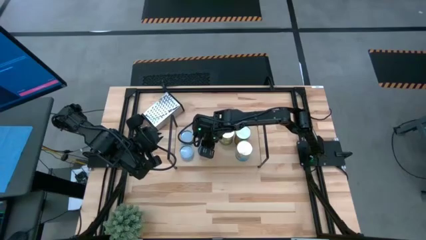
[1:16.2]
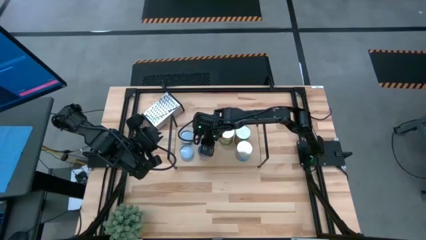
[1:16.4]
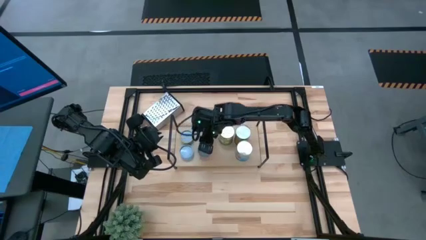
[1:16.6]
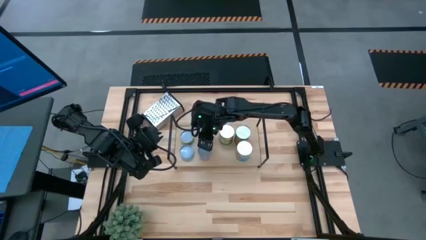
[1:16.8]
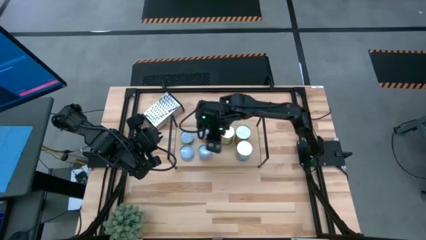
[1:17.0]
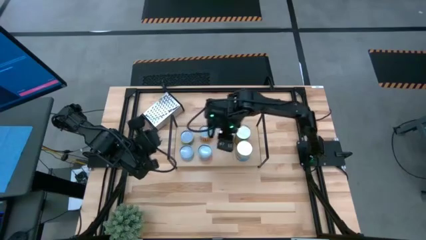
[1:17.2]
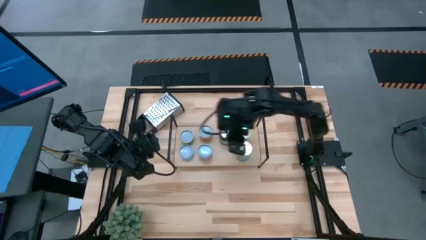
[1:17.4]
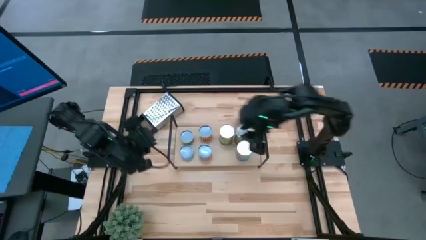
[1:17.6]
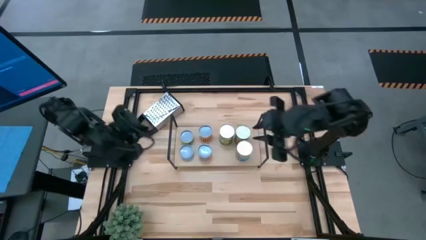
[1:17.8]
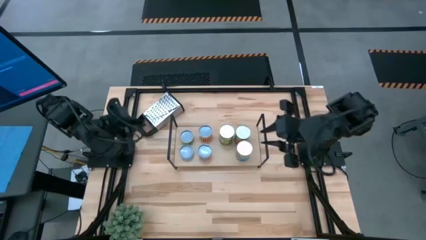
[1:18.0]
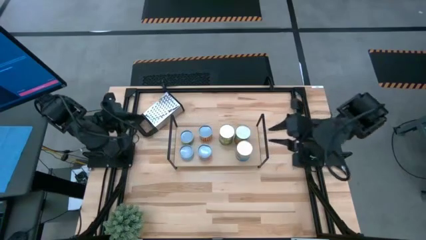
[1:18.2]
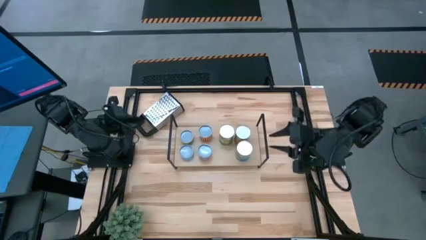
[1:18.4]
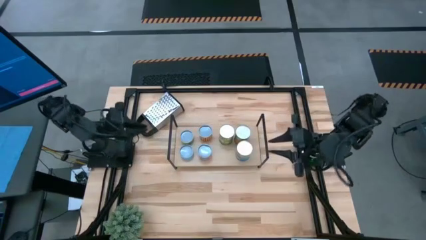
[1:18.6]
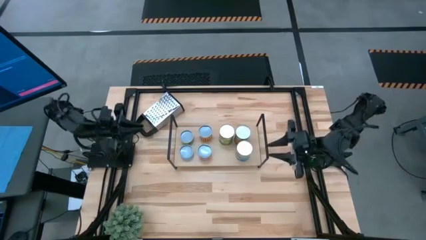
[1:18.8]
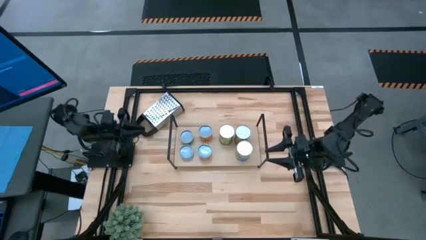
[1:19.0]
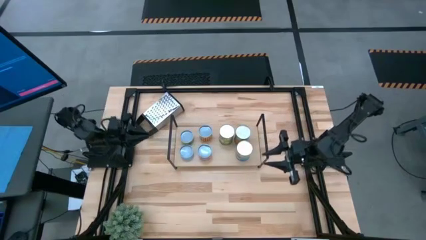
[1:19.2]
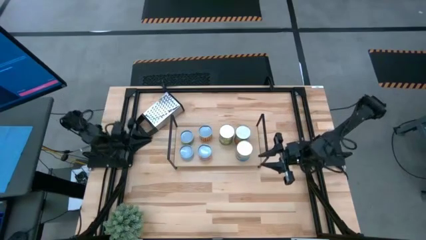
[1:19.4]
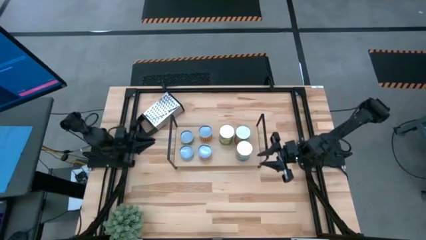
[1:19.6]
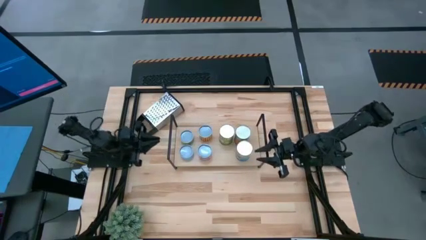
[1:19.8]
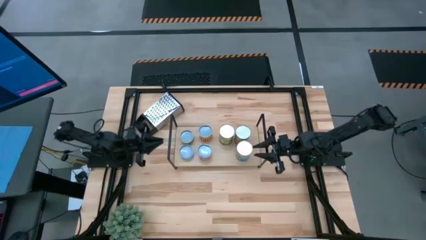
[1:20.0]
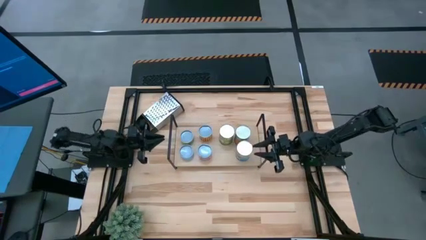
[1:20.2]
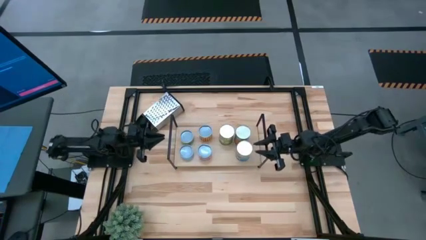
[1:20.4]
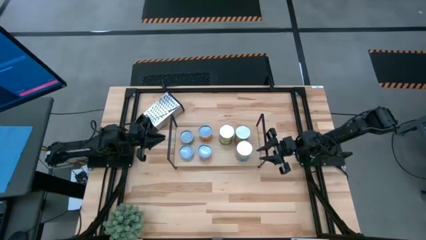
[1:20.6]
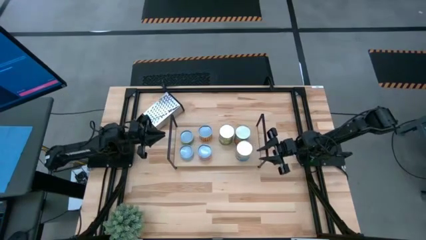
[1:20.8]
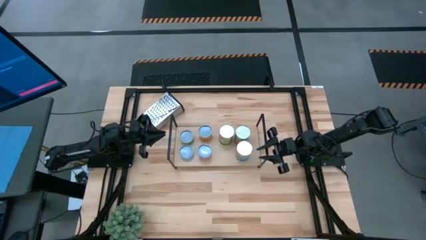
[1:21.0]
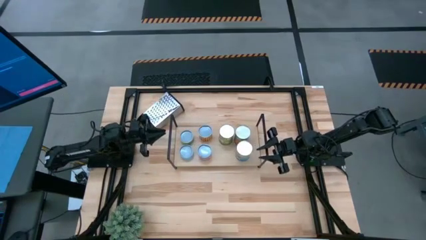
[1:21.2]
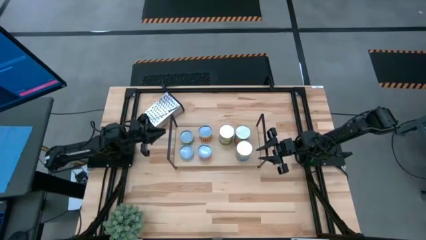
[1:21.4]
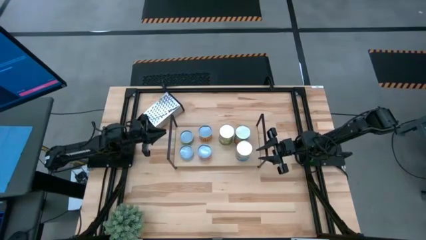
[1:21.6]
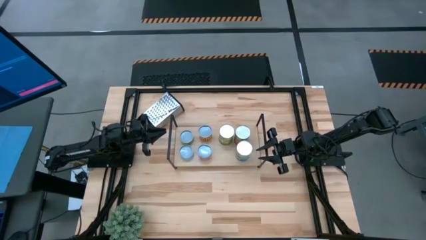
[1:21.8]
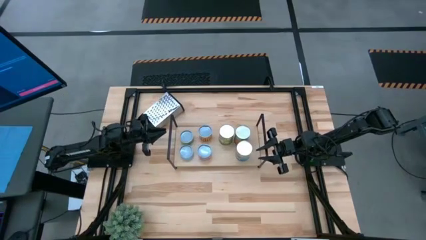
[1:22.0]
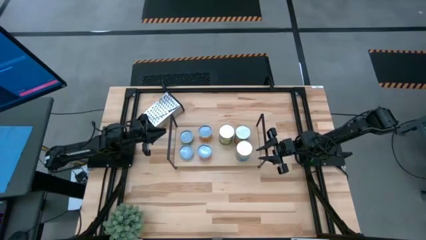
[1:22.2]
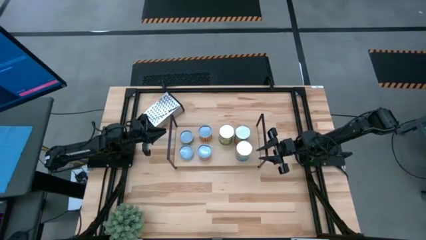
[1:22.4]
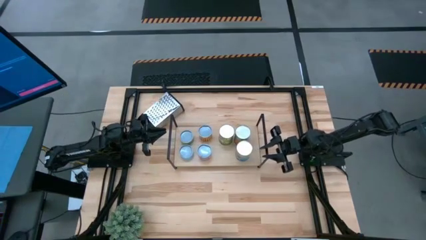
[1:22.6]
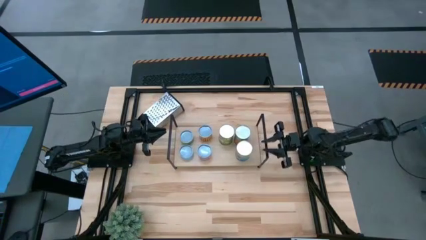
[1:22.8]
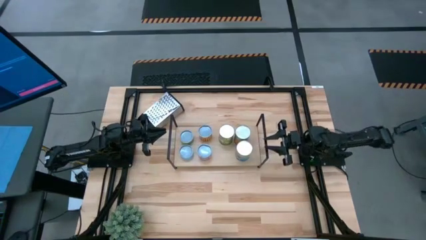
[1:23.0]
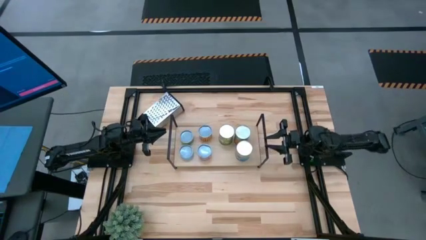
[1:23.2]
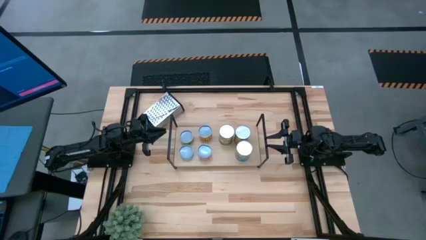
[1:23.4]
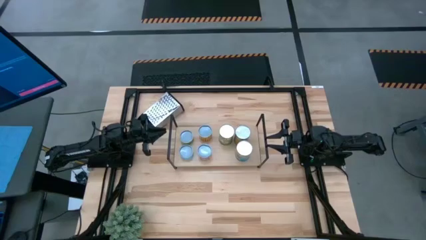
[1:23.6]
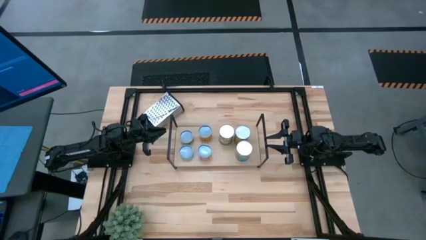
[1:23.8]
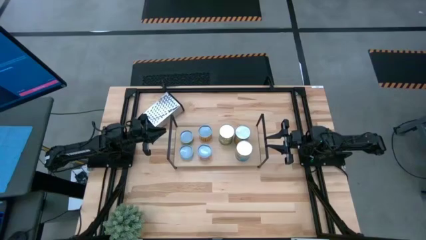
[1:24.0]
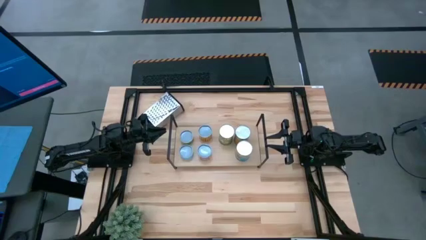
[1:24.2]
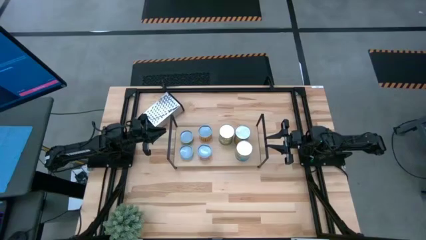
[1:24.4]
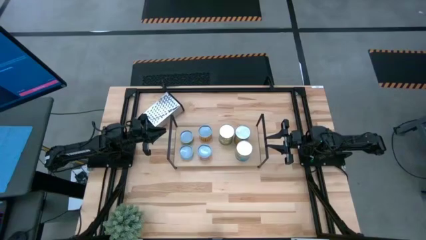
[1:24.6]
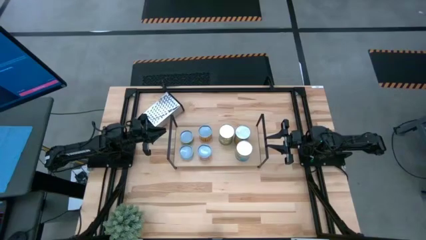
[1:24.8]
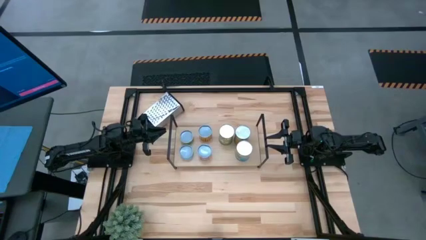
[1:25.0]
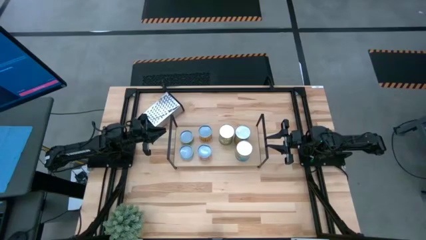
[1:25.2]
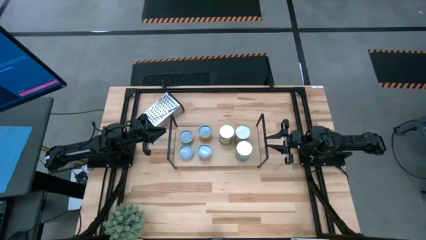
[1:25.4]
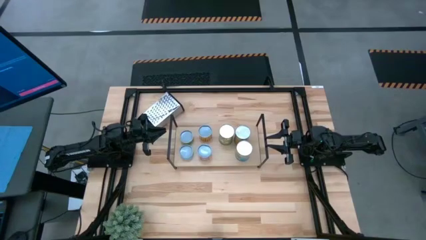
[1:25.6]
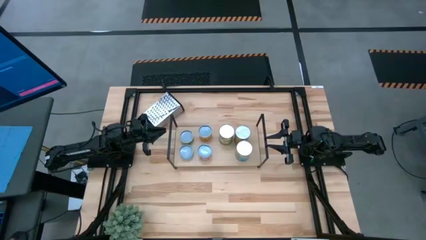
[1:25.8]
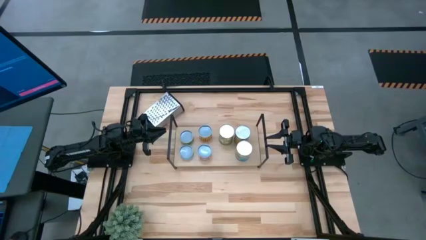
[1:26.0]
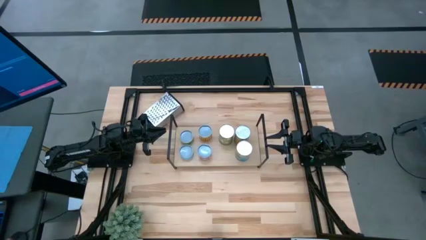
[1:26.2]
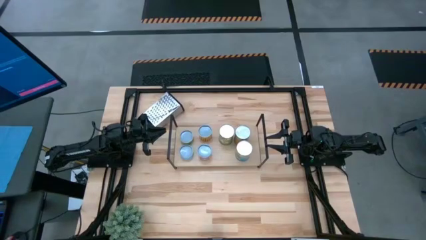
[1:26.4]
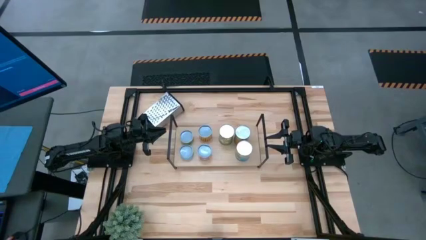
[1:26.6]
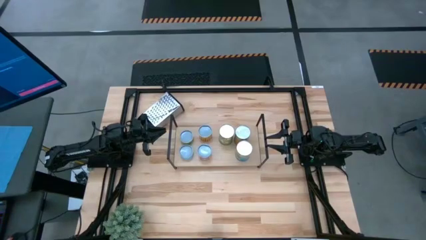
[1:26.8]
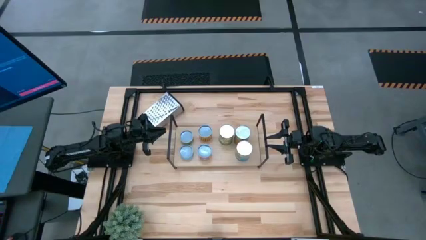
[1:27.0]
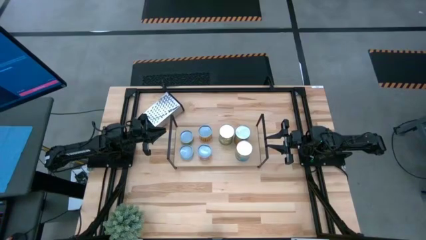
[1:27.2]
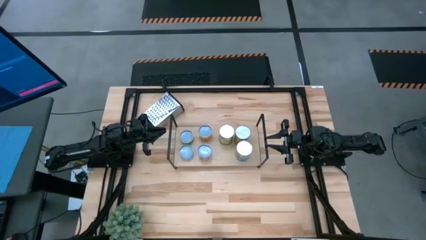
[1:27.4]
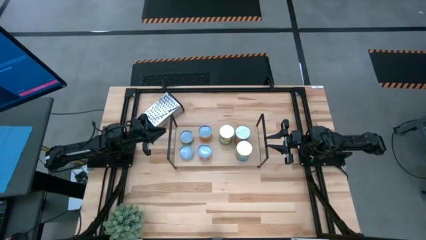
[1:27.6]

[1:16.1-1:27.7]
Task: Pick and place cans onto a shelf
Return to Home Position

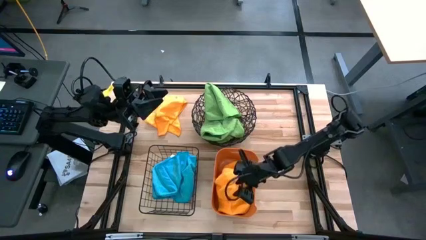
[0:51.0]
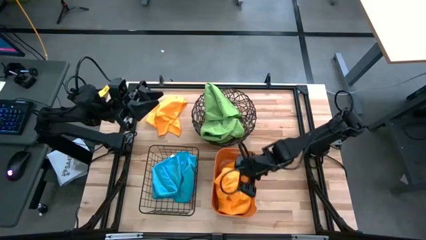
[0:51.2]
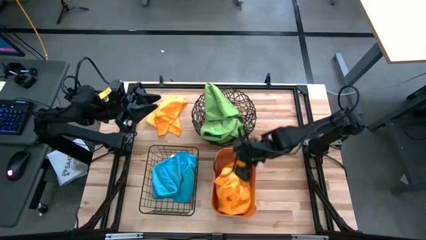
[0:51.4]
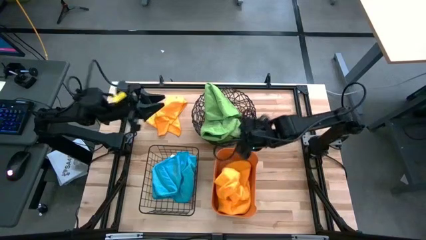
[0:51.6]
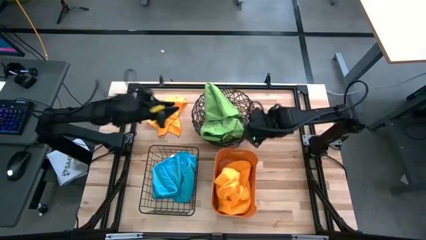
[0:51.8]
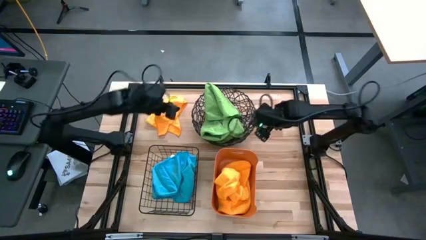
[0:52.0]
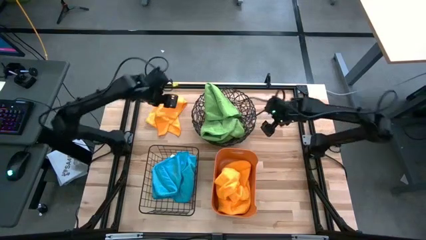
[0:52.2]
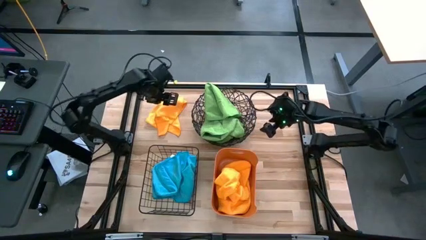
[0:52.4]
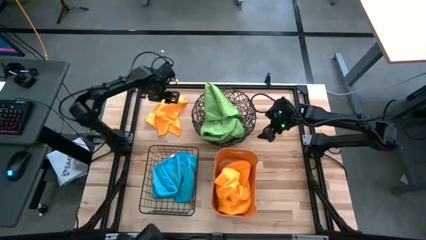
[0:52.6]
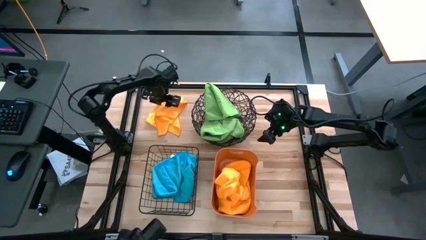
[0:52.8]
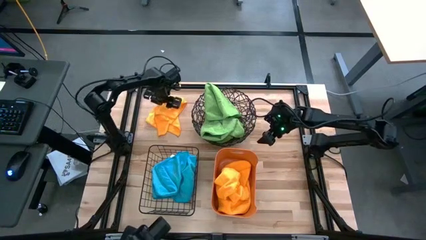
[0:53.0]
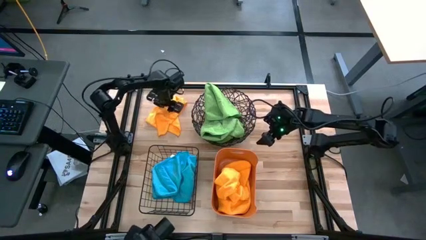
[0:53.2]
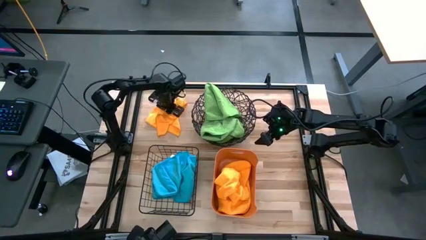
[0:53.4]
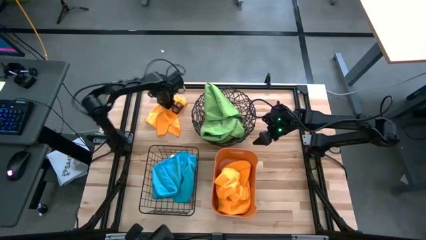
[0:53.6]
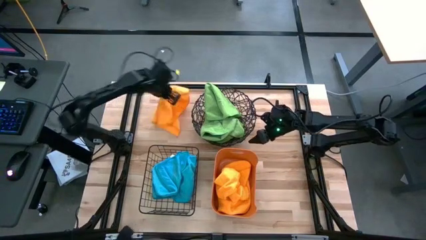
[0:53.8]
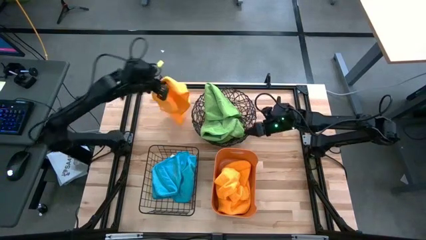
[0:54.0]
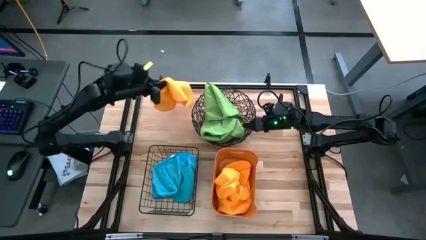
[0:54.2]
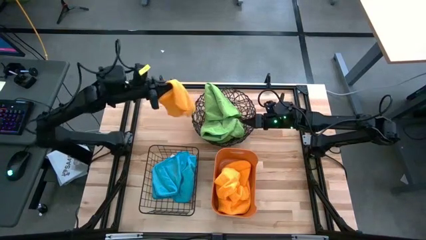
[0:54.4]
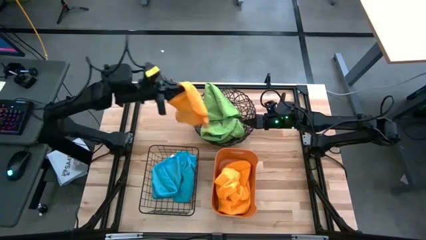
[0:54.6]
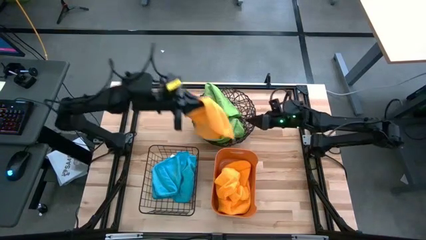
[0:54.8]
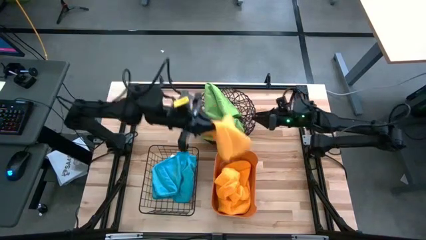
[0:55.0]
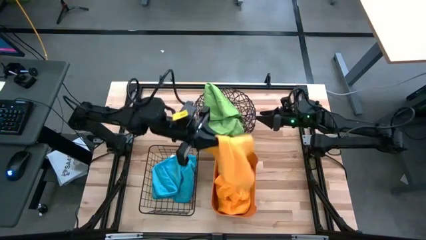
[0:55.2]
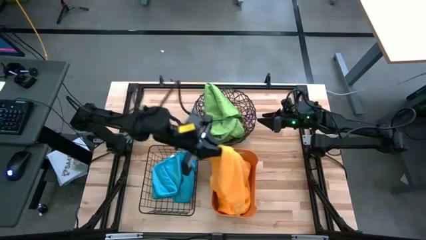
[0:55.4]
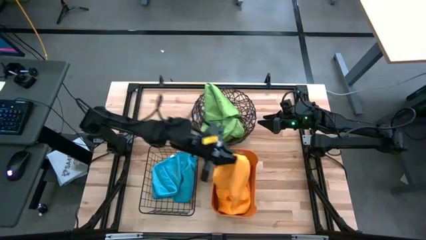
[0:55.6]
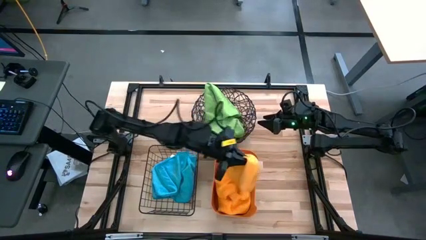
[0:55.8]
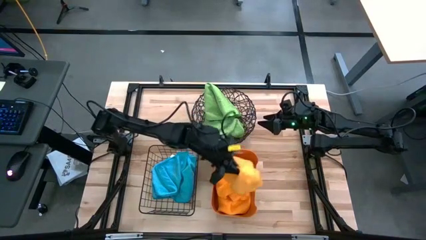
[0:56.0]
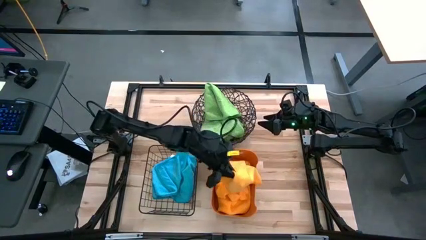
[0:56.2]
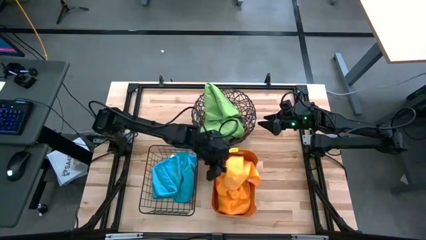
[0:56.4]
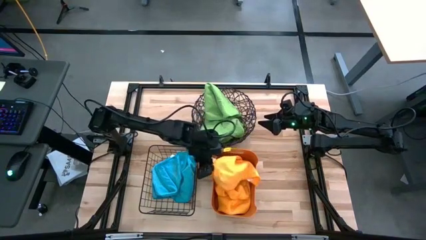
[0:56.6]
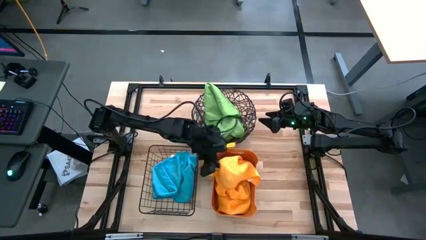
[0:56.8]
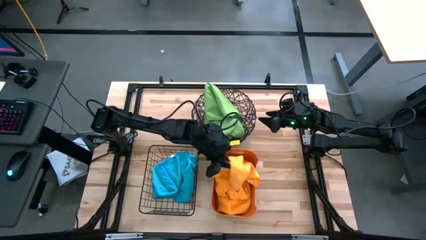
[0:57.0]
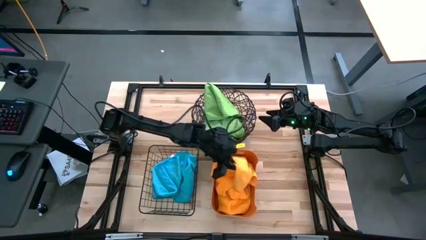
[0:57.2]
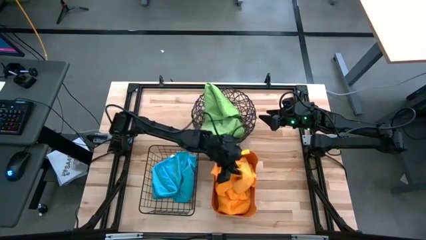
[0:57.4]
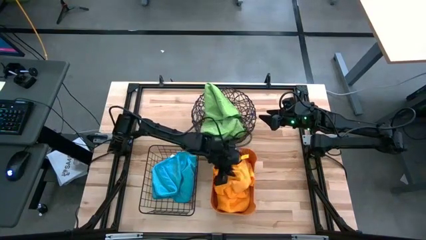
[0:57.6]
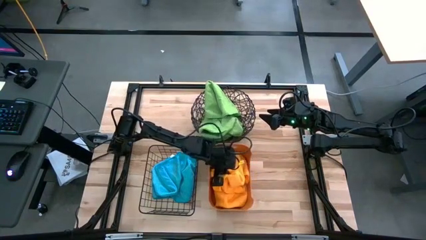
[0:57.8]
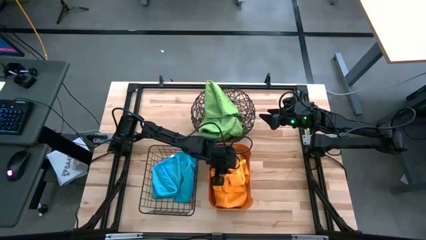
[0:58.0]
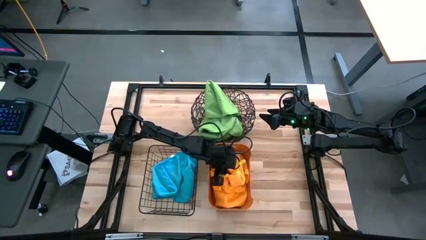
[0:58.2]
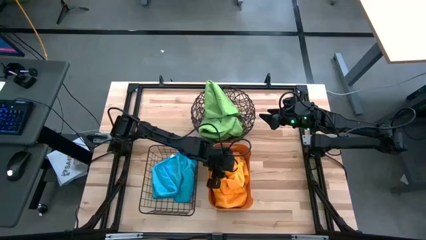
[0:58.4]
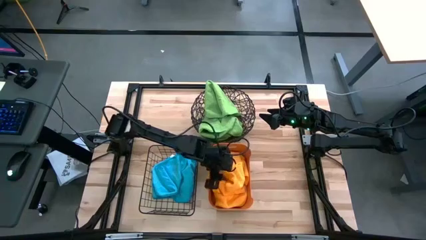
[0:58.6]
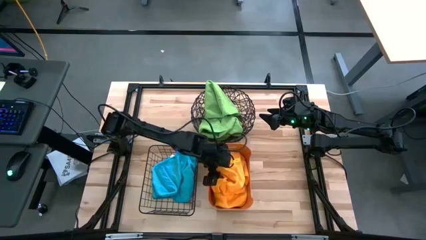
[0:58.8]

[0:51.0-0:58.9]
Task: Sort microfiber towel by color & place in baskets
Put the orange microfiber towel into the orange bin
